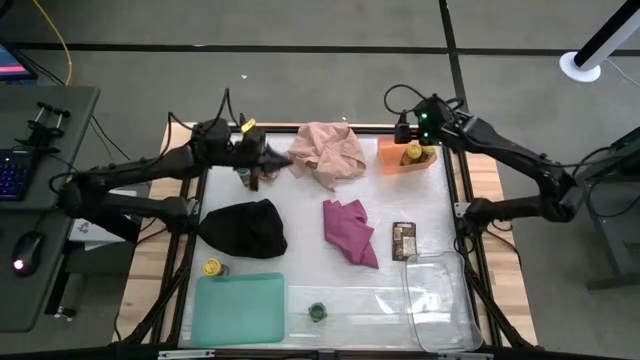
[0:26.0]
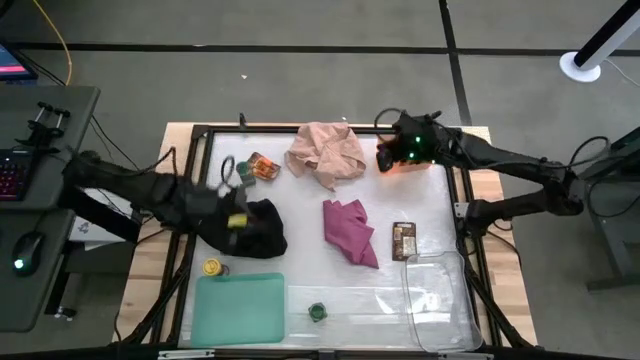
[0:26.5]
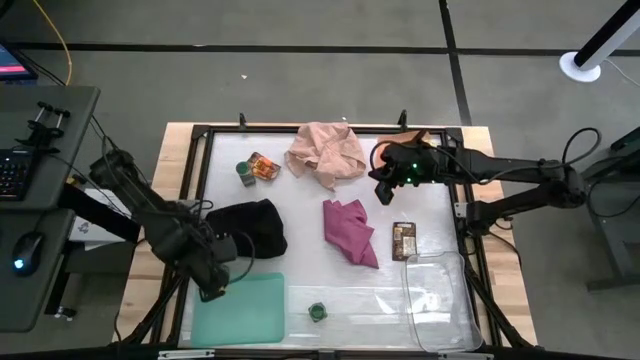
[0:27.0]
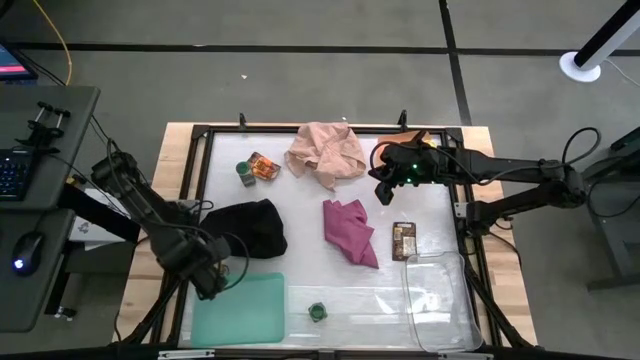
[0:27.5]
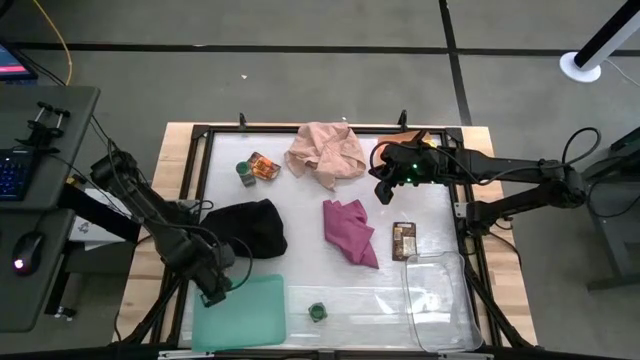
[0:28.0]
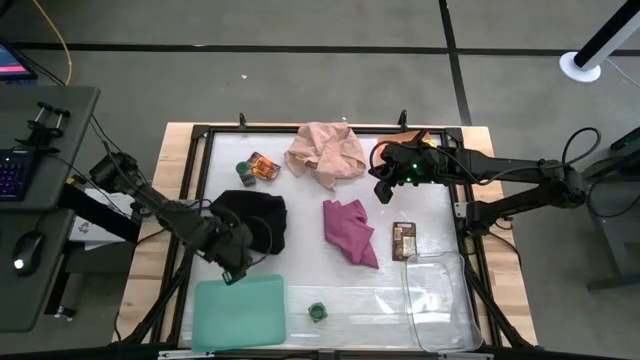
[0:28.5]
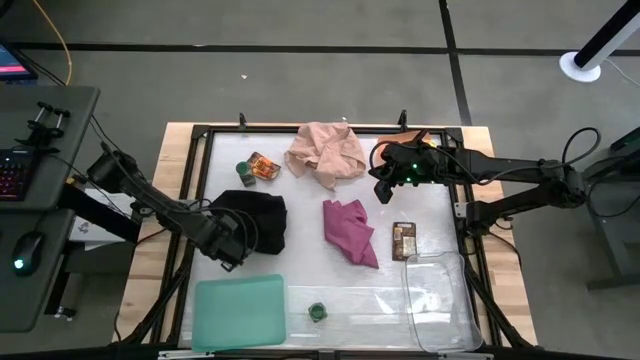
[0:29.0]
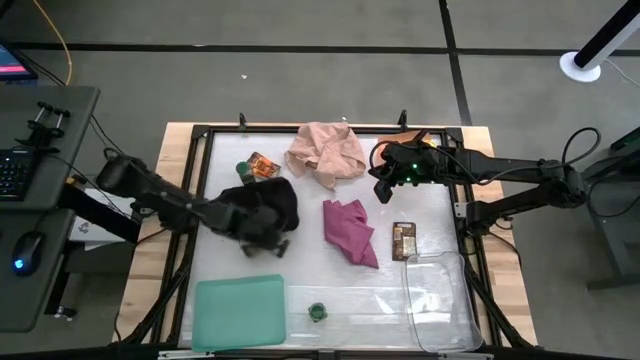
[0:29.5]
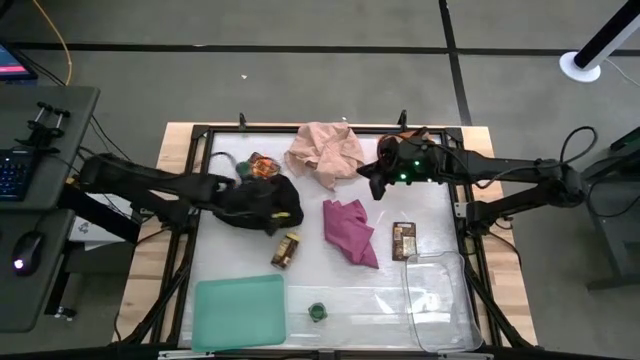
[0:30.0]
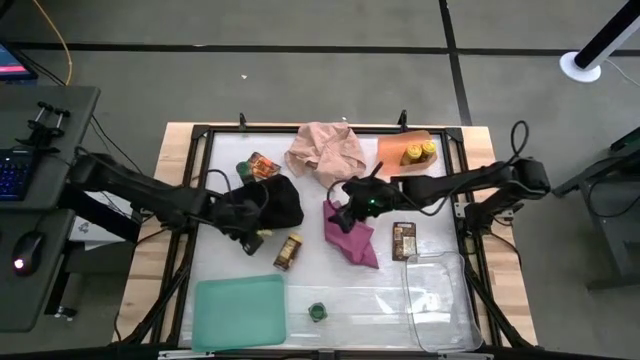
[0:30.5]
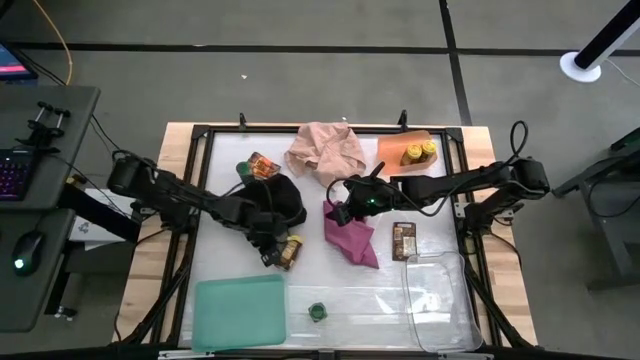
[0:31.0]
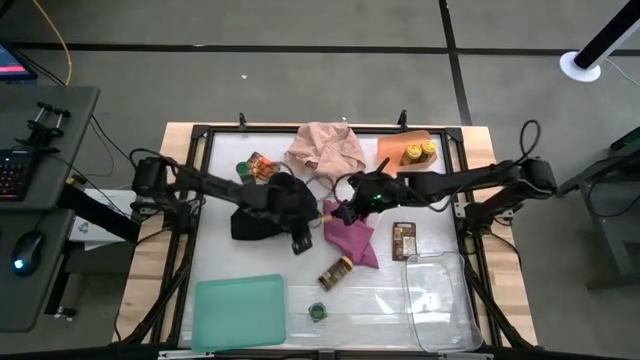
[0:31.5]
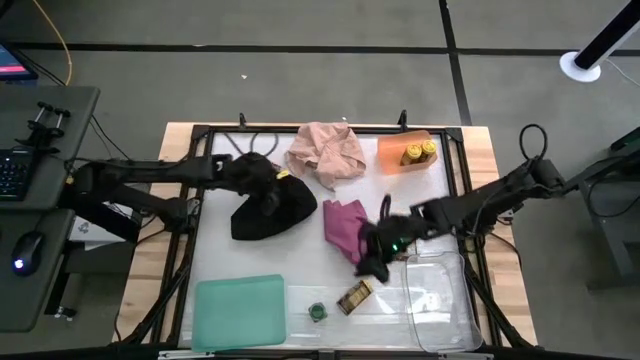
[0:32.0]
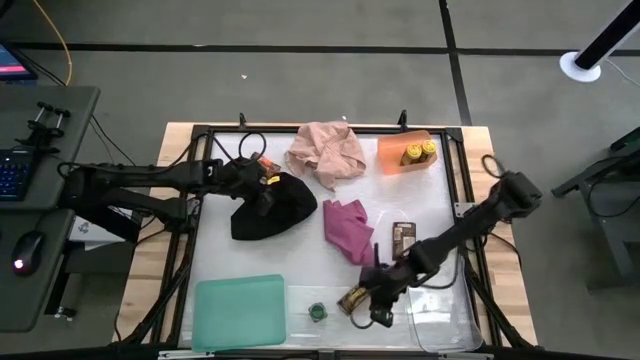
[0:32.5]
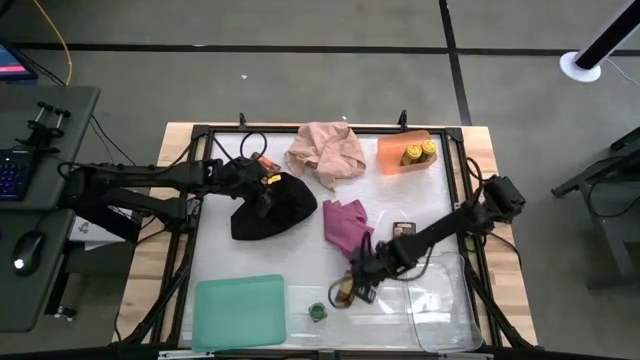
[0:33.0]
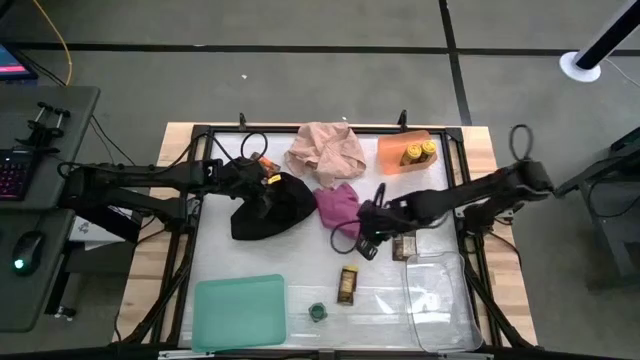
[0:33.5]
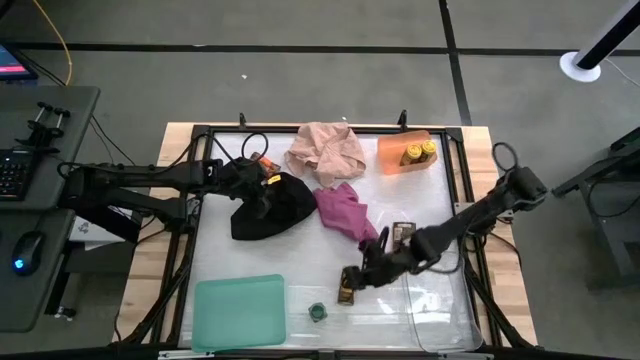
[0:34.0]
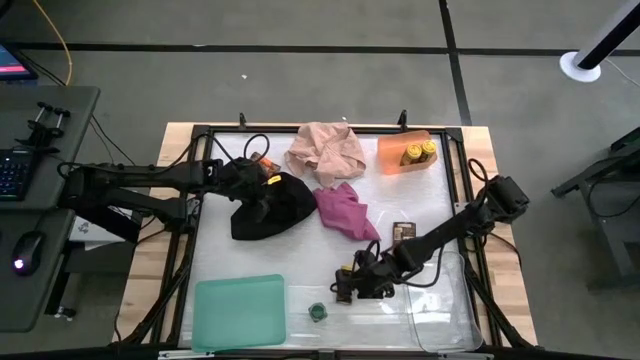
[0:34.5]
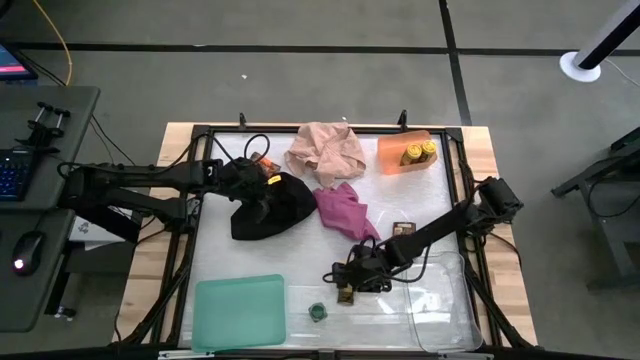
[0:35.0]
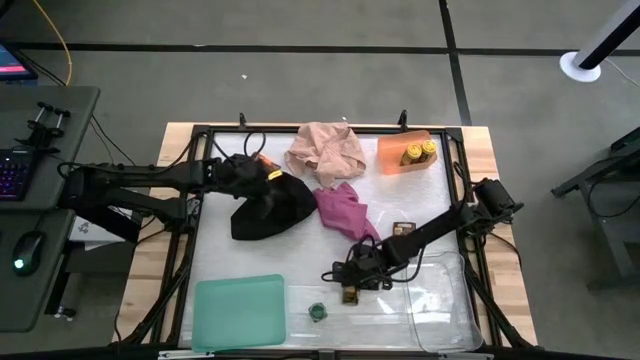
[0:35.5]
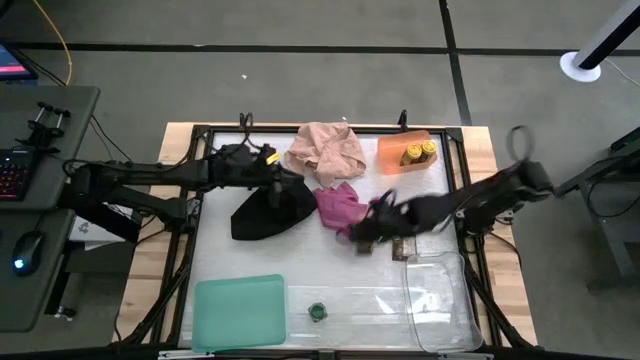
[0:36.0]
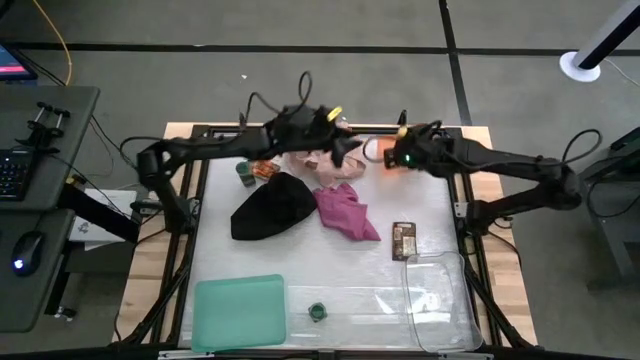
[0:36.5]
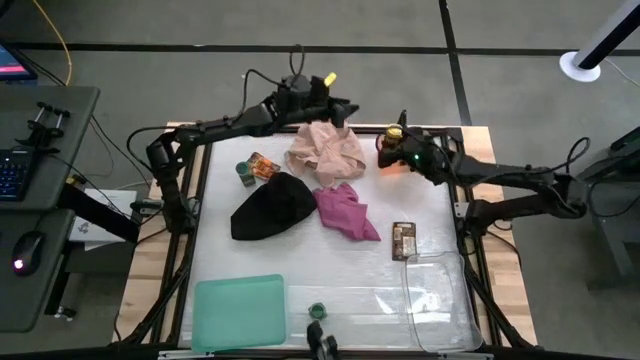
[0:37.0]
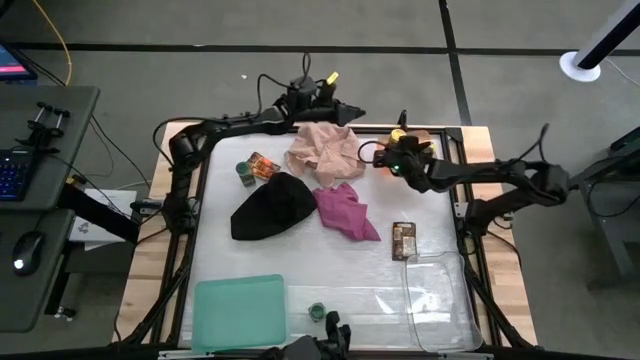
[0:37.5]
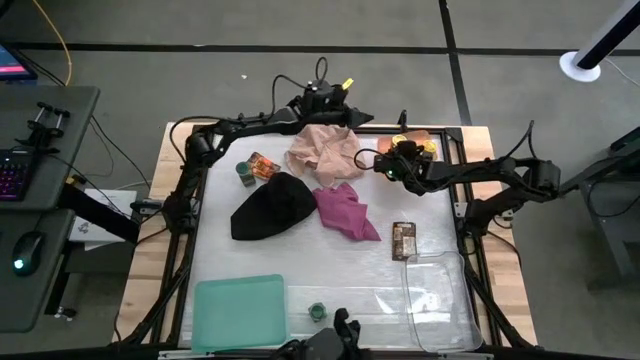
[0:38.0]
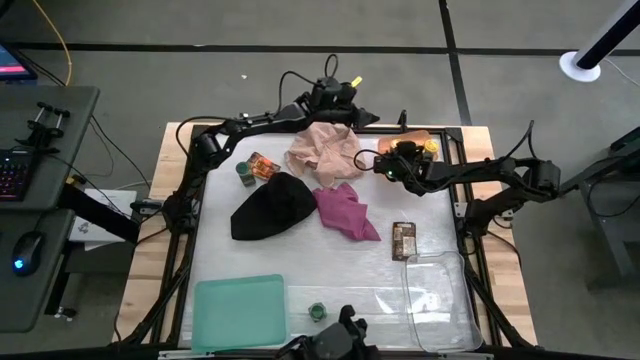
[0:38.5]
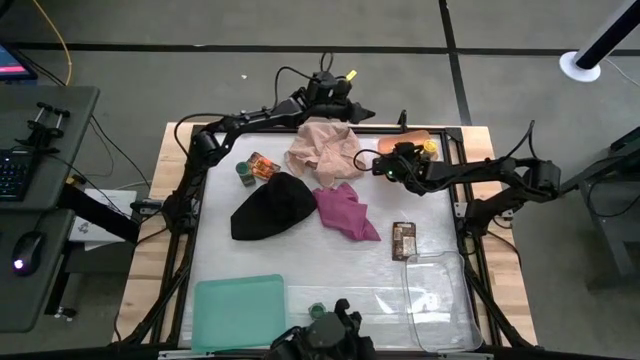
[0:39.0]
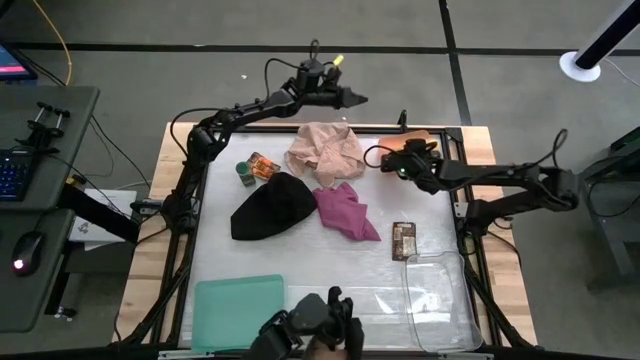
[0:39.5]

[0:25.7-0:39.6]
Task: Sort spices by type
Put the yellow seasoning bottle into the orange bin

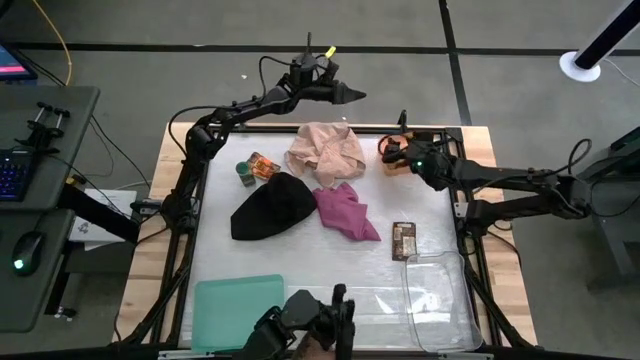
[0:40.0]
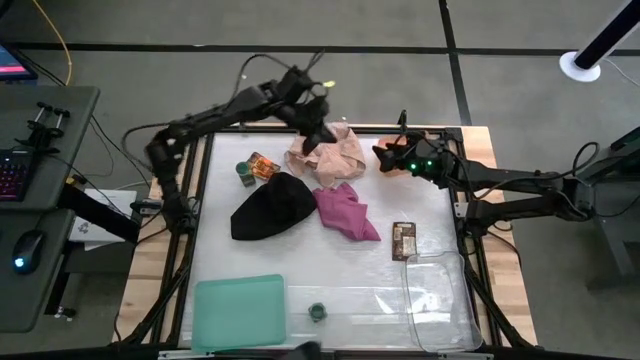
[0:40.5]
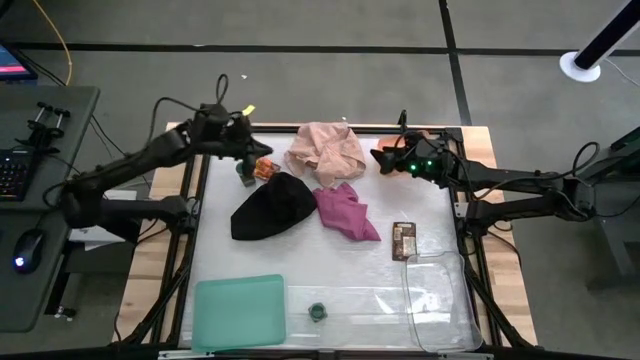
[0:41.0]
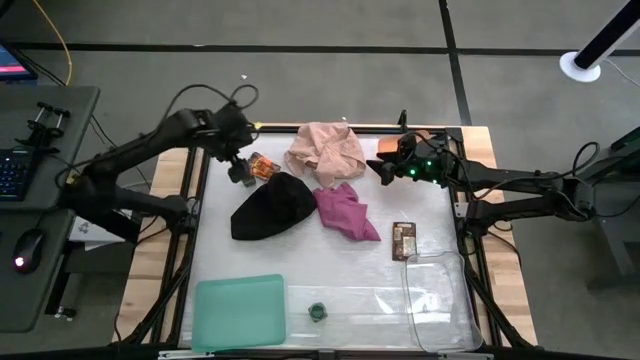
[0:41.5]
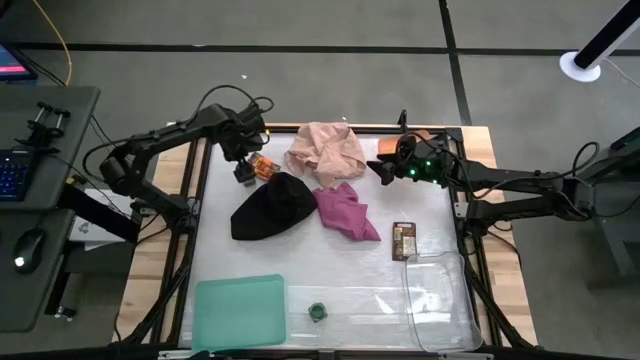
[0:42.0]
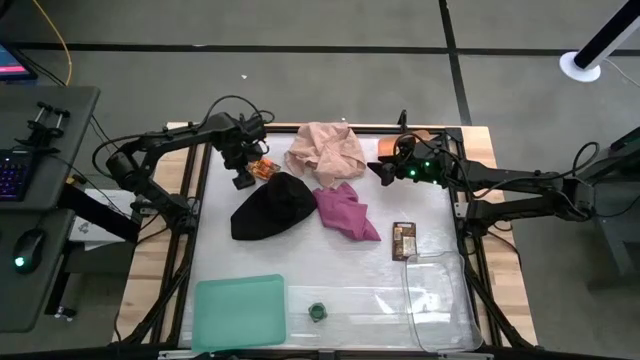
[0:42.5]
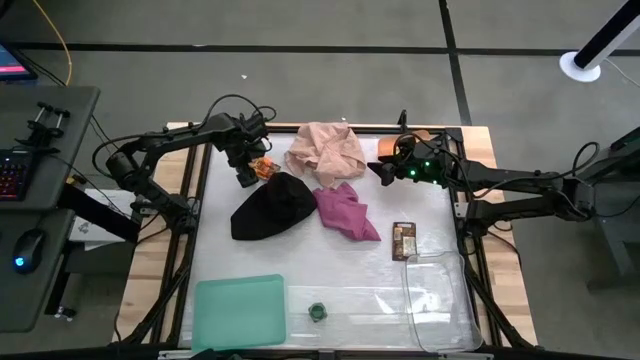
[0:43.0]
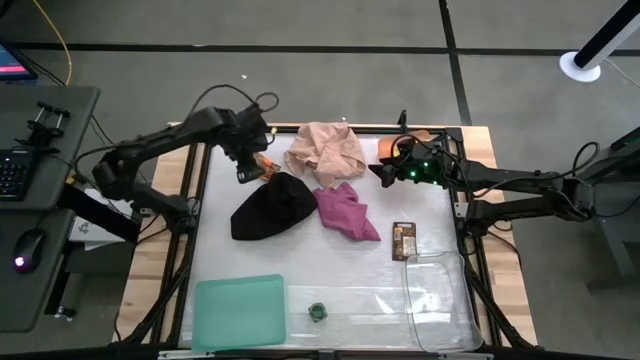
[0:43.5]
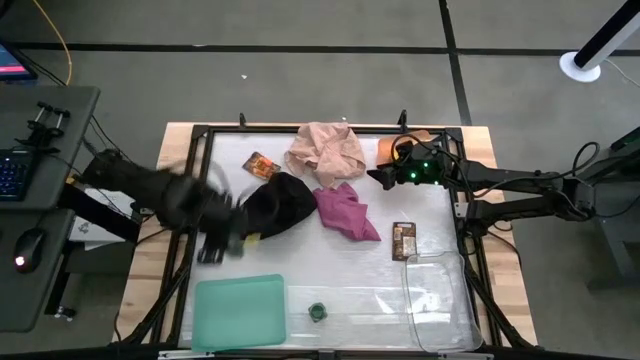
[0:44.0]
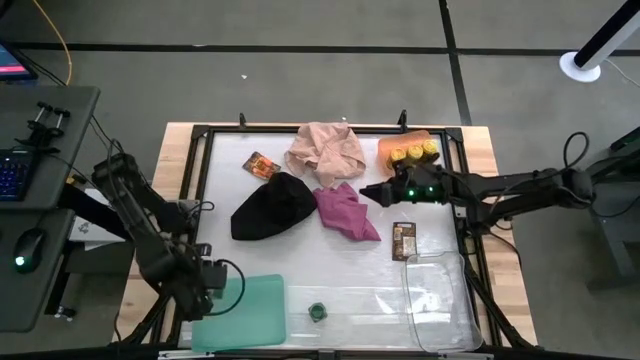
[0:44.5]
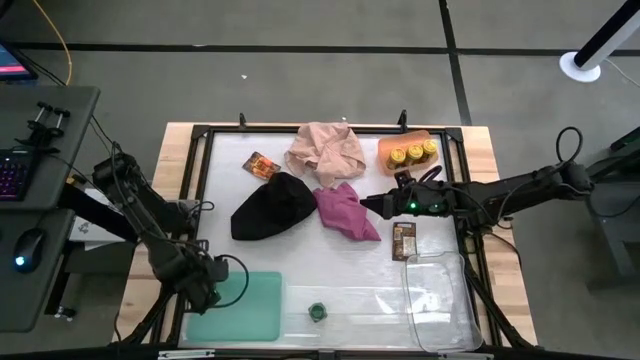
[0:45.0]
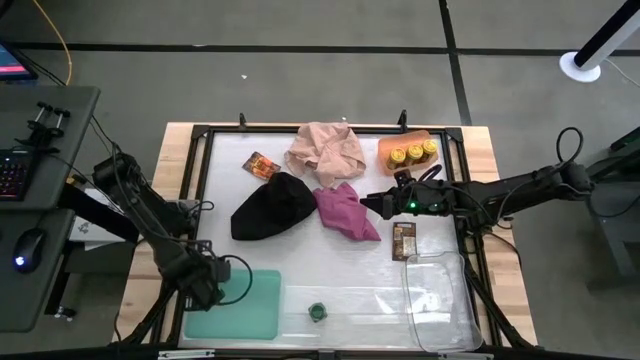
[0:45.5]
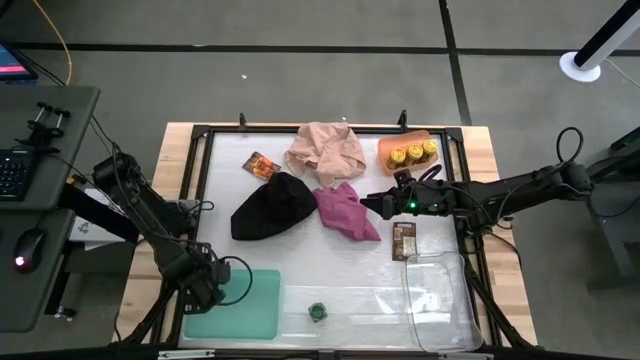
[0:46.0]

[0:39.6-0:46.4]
Put the top green seasoning bottle into the blue bin

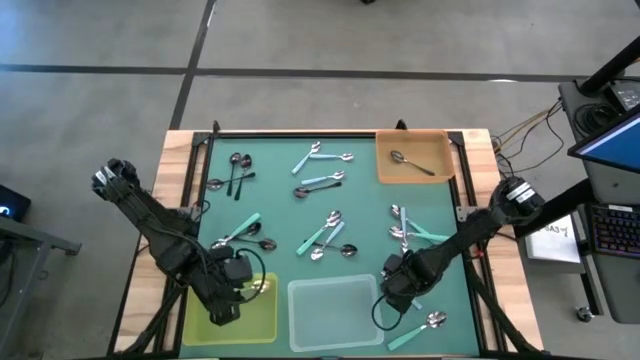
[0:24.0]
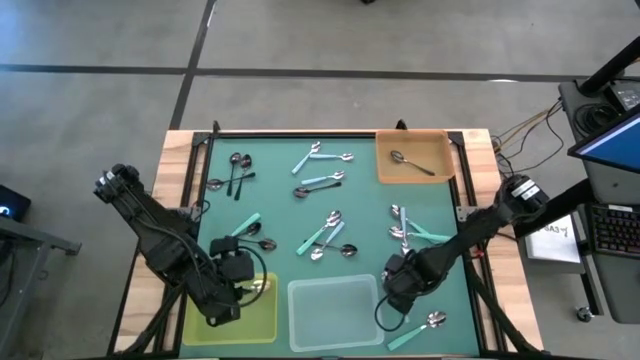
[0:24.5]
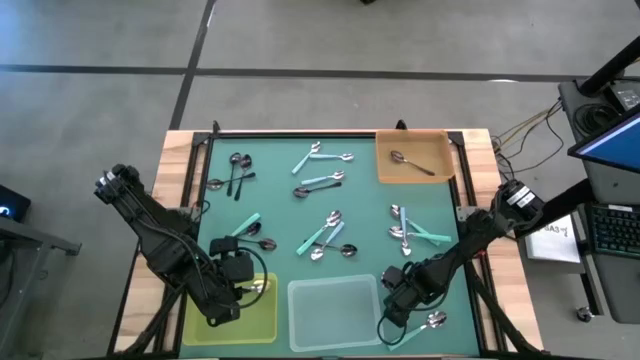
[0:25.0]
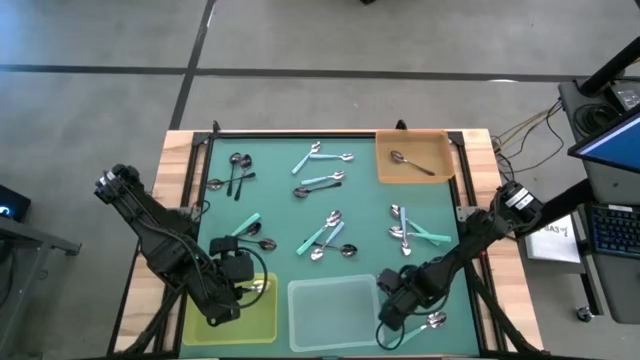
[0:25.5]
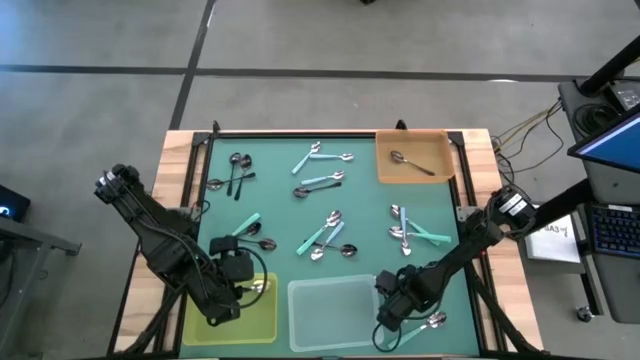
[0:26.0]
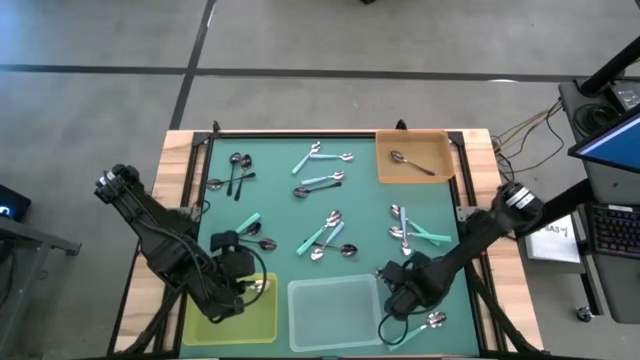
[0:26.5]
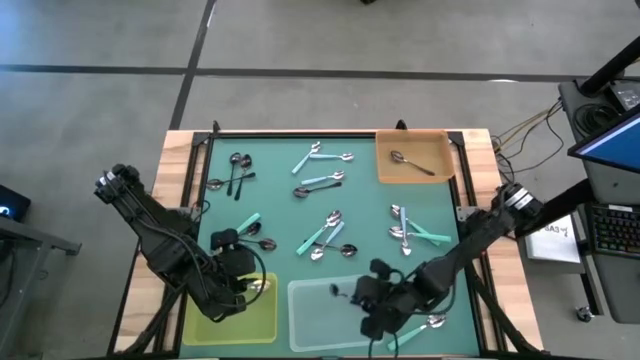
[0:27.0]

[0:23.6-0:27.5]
Task: Sort silverware by color (type)
Put the blue spoon into the transparent bin
